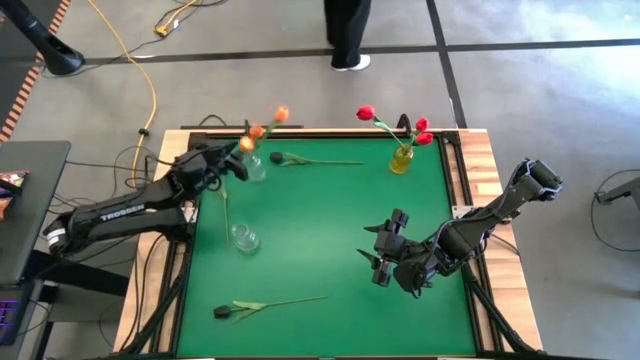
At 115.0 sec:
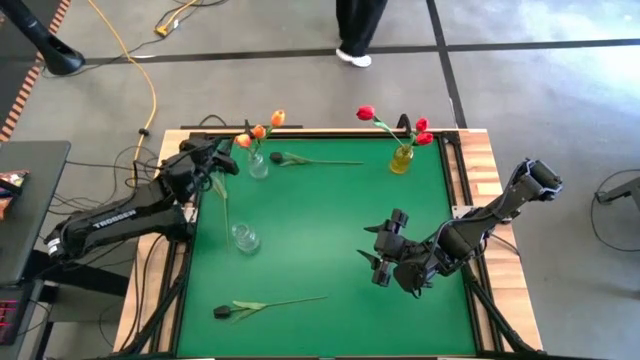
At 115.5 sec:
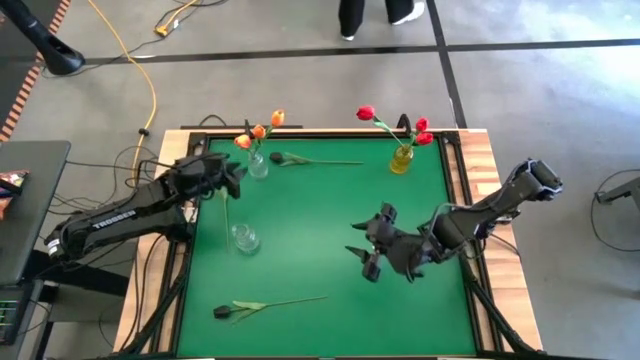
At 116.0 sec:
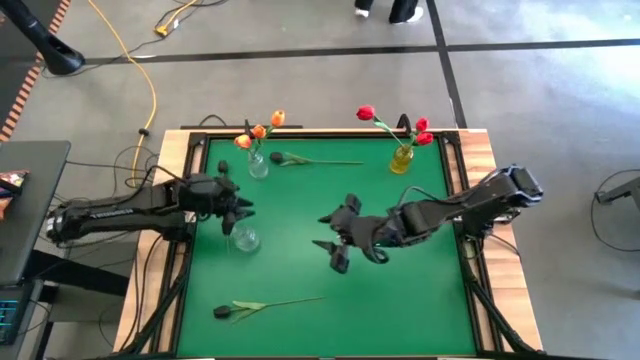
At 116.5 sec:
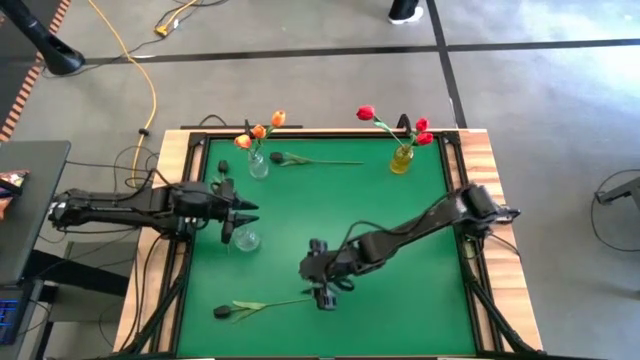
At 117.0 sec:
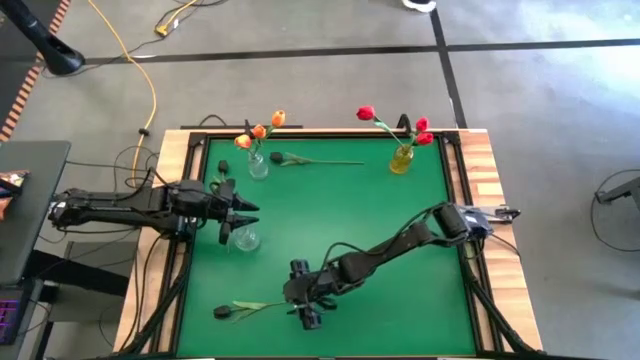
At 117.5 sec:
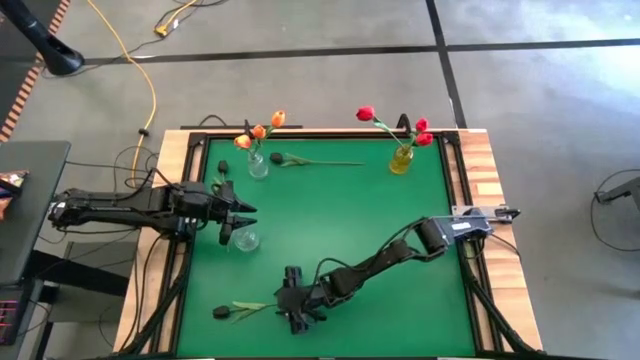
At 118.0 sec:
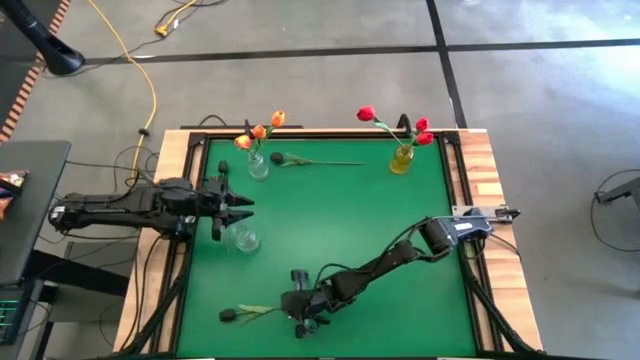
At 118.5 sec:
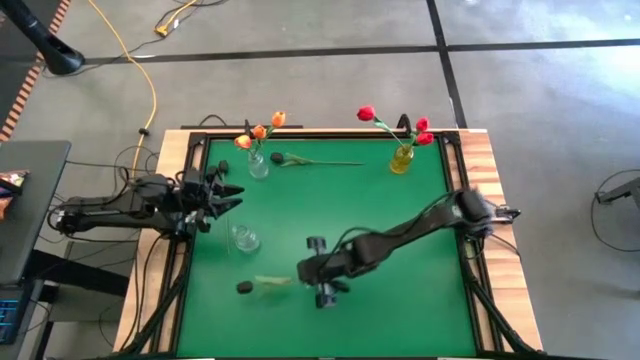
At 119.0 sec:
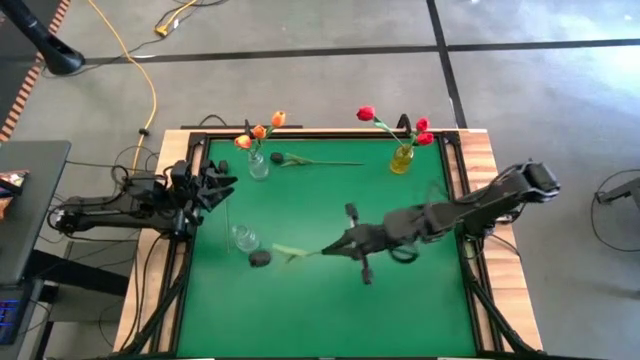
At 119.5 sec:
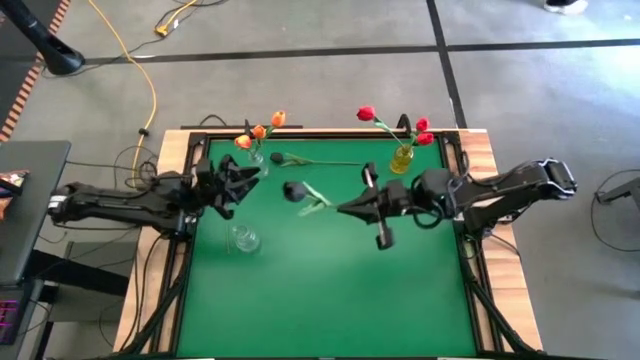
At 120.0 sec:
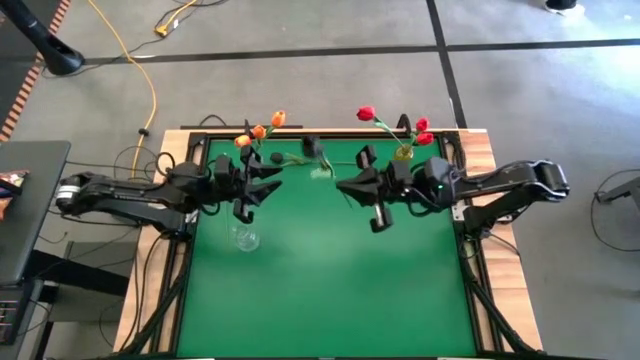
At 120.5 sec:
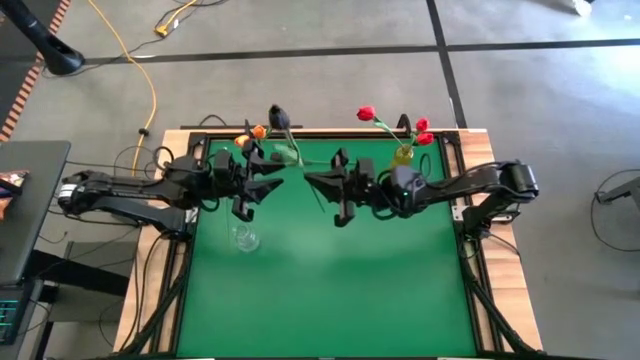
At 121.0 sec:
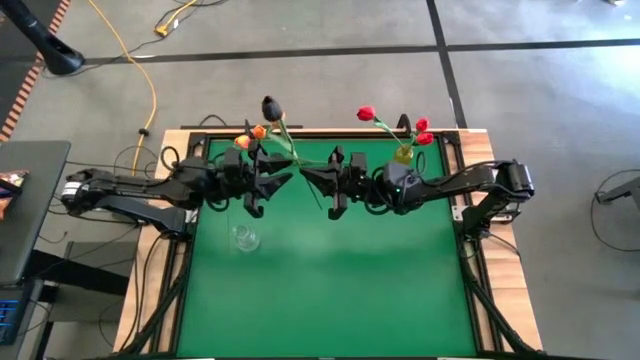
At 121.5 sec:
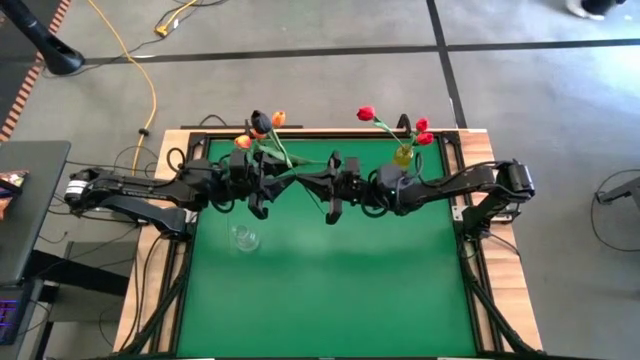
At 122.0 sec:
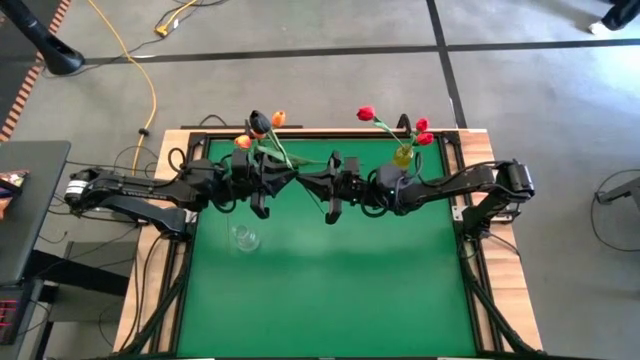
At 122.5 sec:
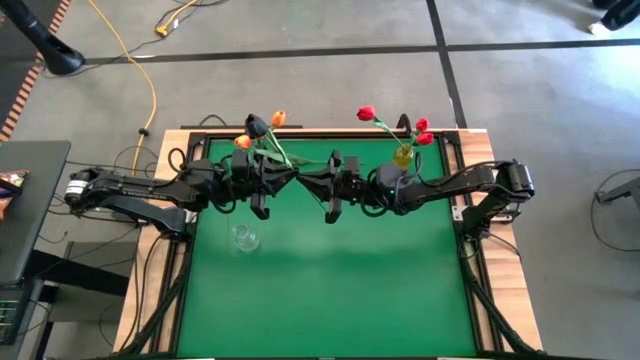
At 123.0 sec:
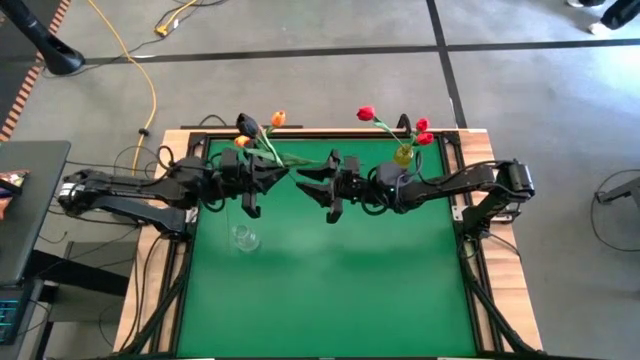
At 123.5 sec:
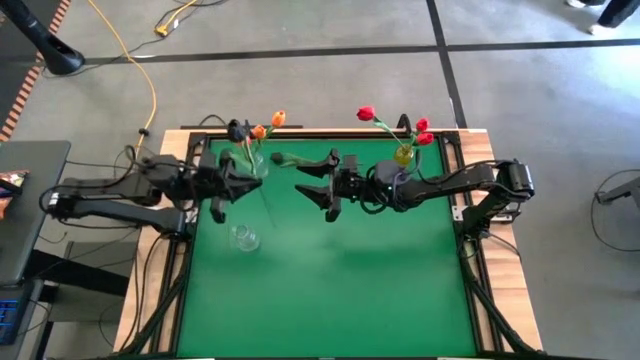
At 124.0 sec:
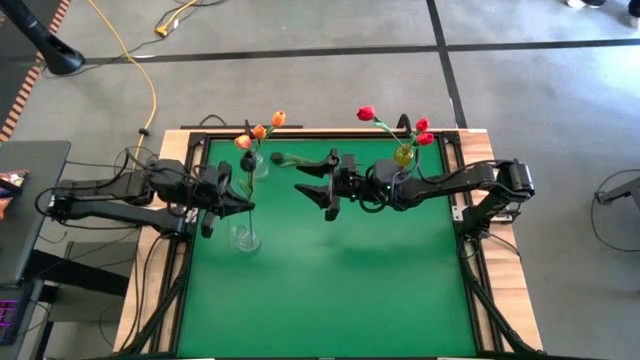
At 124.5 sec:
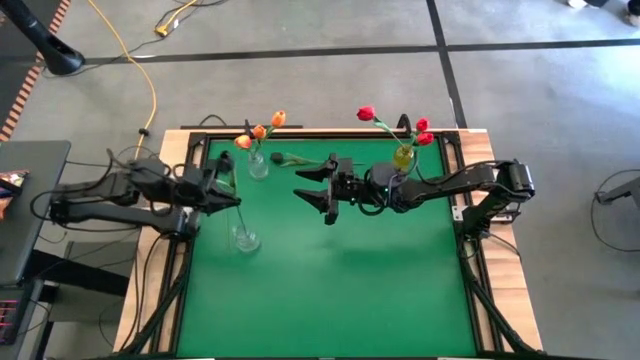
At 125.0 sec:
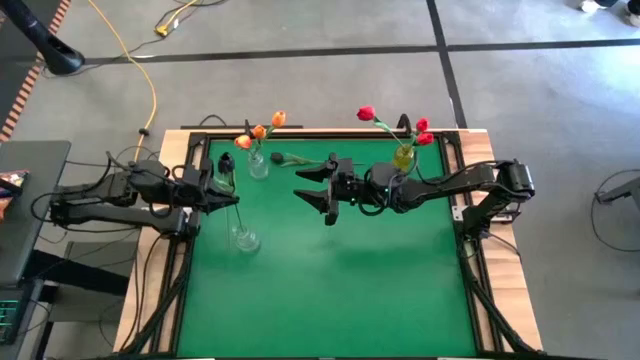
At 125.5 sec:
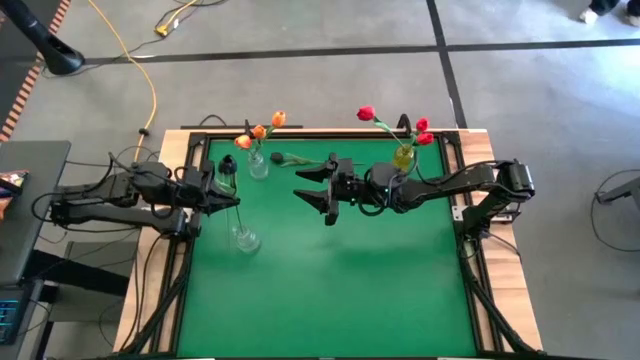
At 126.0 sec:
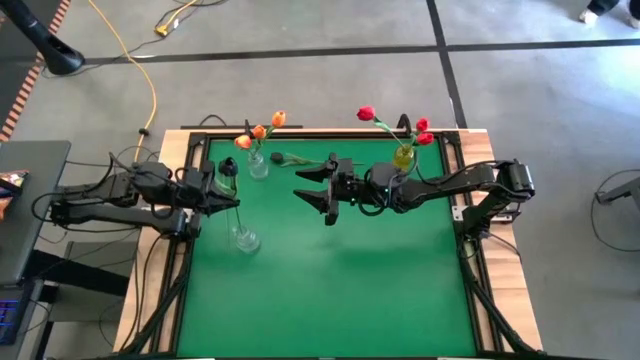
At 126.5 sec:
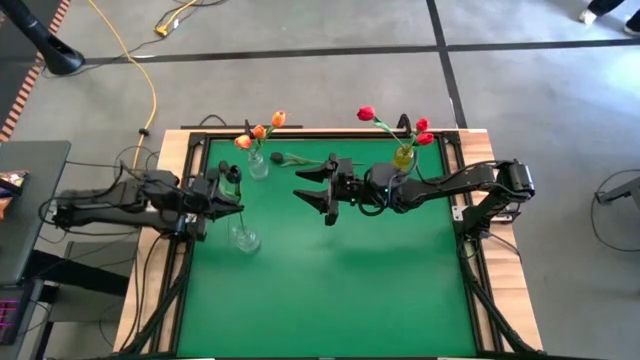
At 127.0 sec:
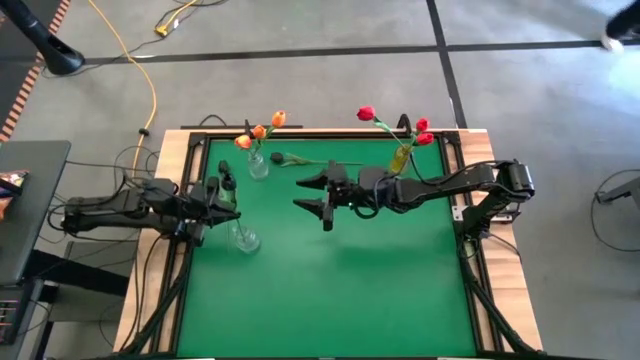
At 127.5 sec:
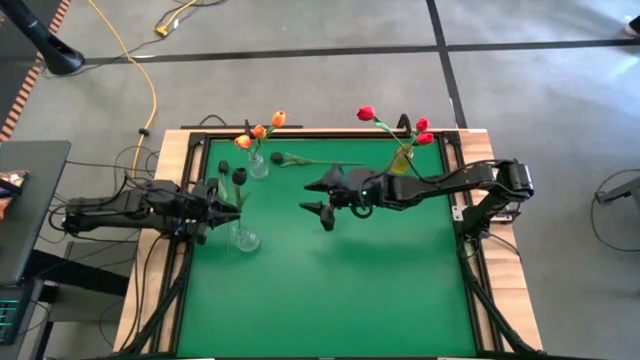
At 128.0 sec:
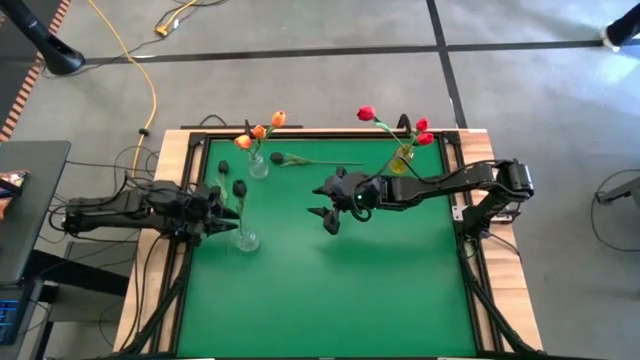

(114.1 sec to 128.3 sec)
Task: Sort flowers into vase by color
Put the bottom black flower into the bottom transparent vase

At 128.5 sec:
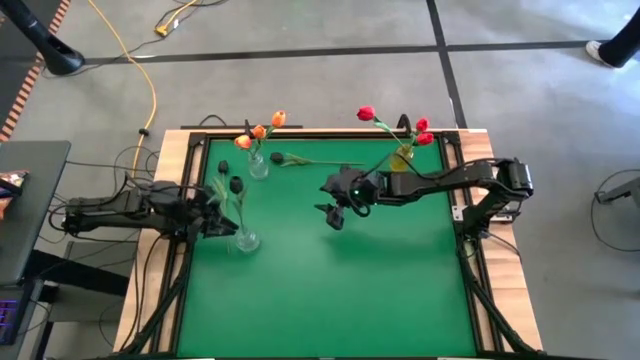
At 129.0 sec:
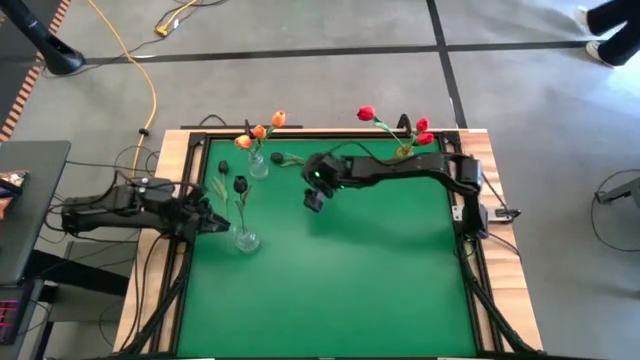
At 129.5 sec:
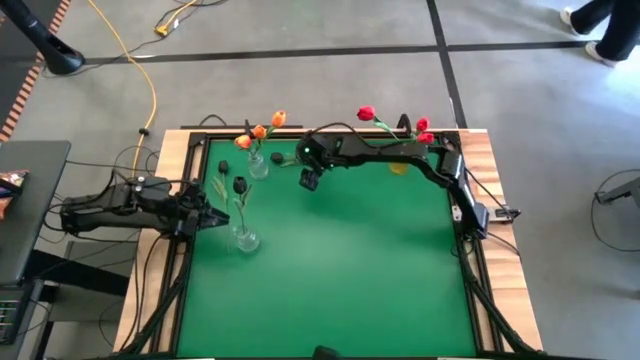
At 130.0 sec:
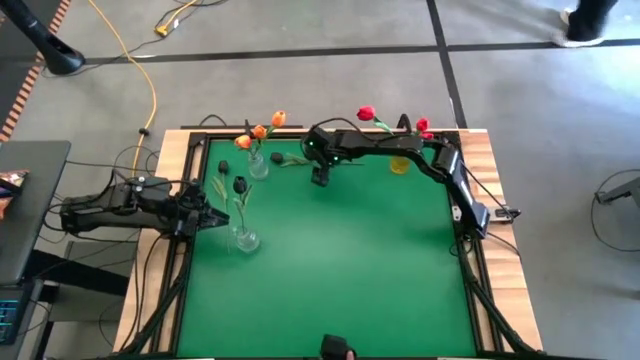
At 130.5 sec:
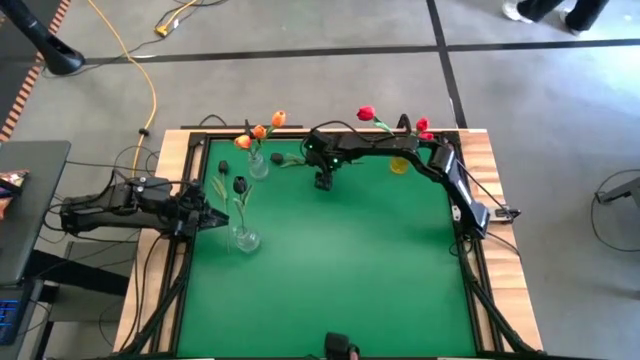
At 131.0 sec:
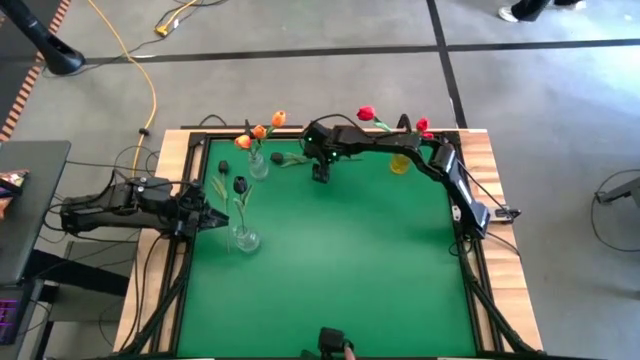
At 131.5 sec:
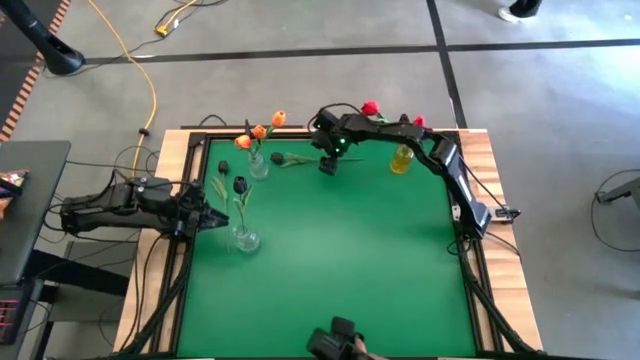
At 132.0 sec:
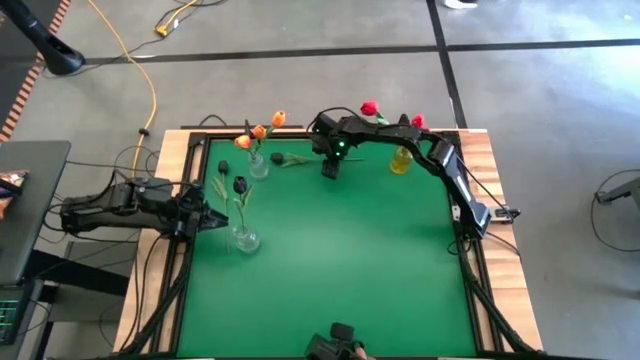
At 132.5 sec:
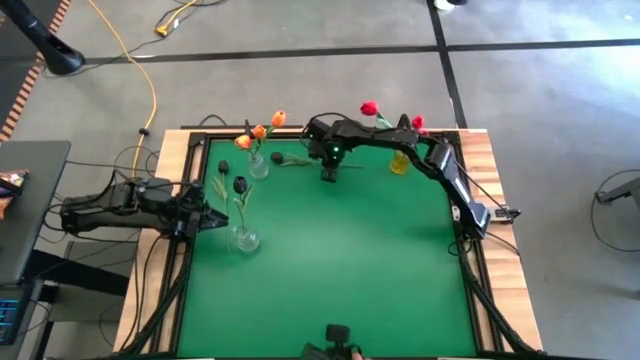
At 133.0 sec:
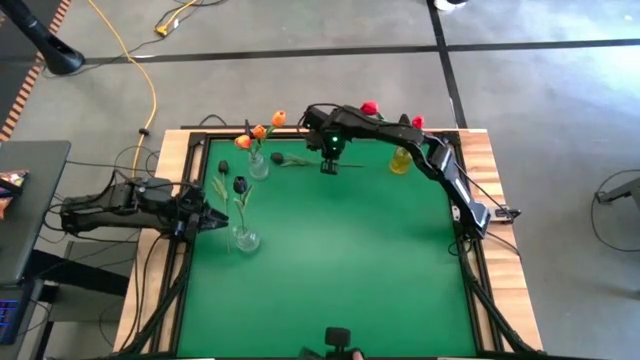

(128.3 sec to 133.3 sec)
Put the right black flower into the bottom transparent vase

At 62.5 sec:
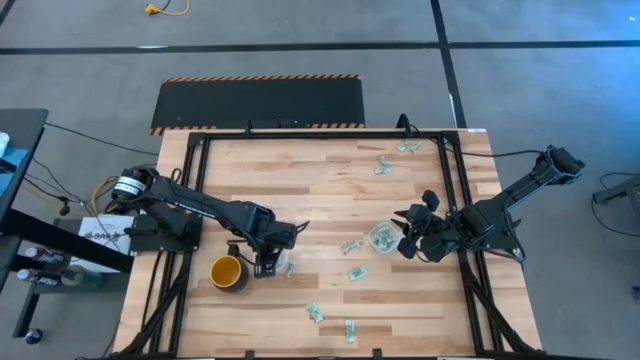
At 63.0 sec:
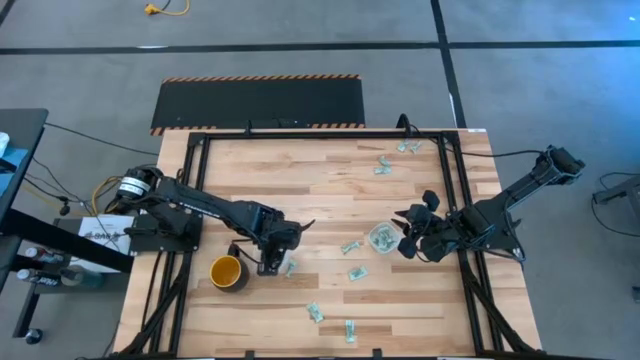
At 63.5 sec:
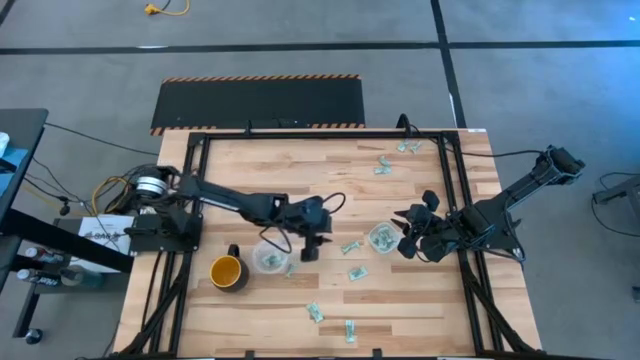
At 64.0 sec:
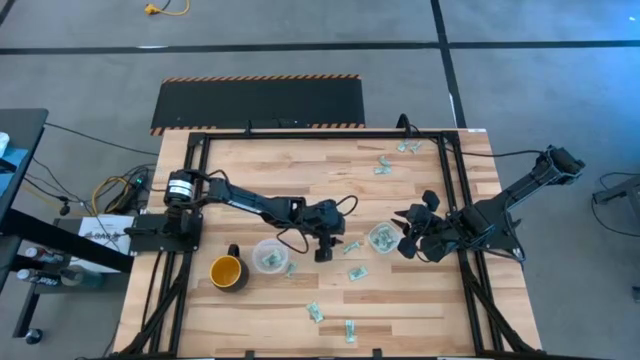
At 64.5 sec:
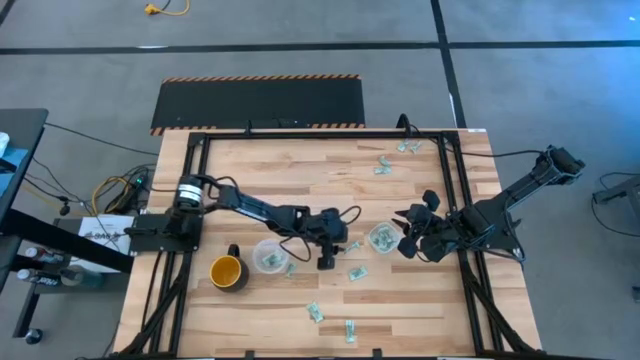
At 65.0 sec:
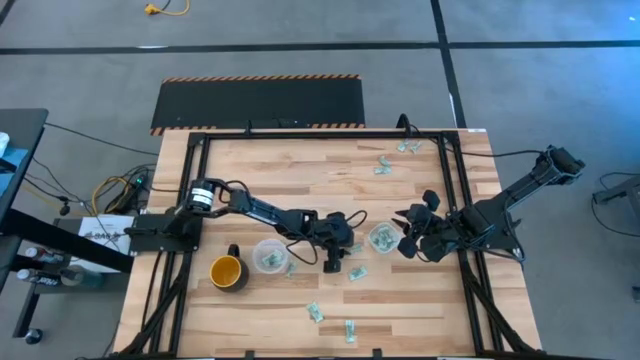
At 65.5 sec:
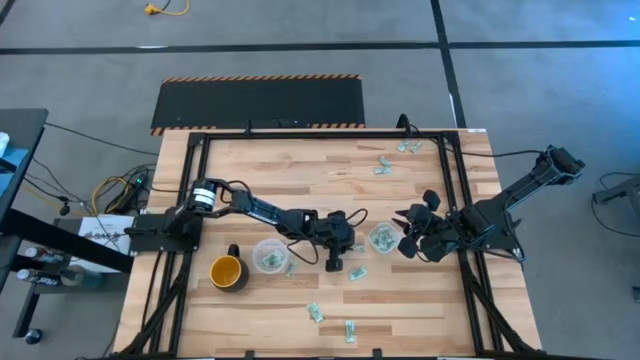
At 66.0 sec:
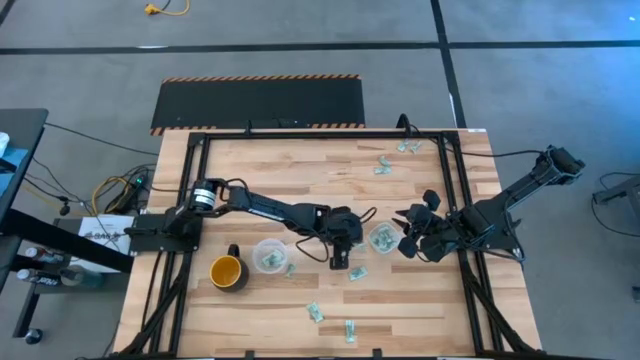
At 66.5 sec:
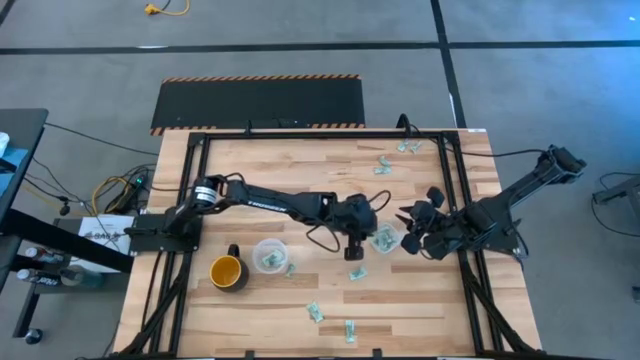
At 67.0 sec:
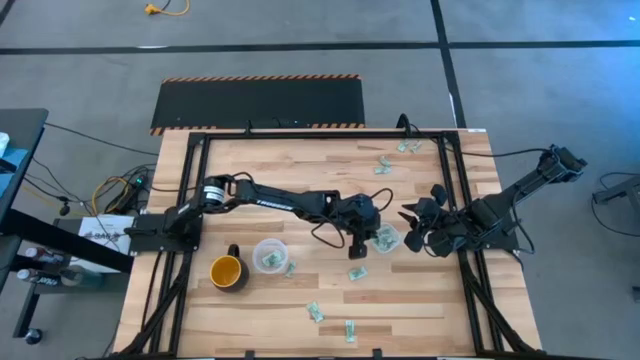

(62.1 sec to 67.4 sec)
Task: Pick and place Stevia / Truvia into bins
Put the white stevia packet into the square transparent container
